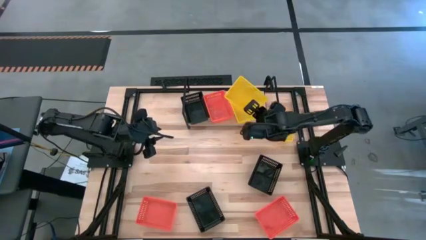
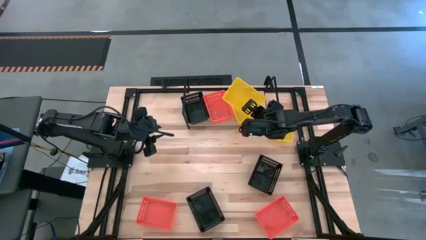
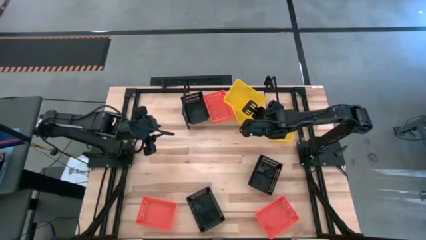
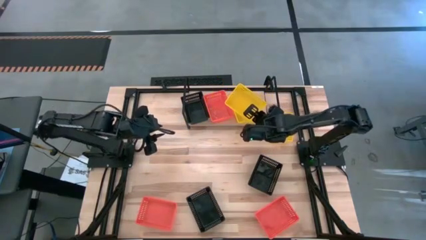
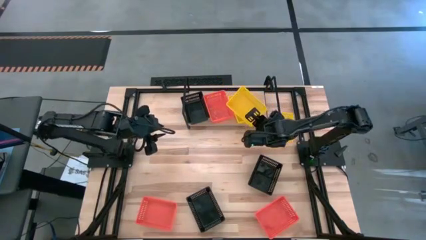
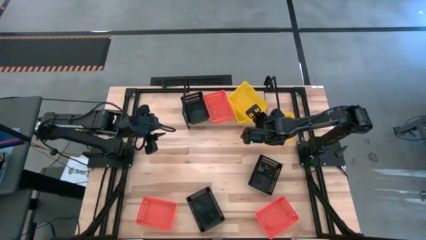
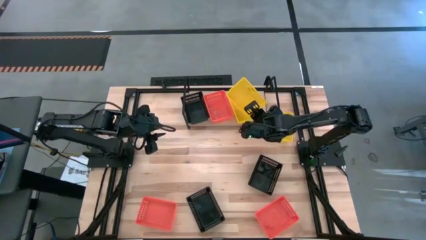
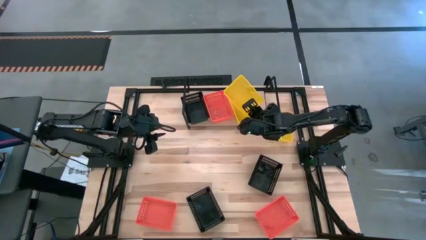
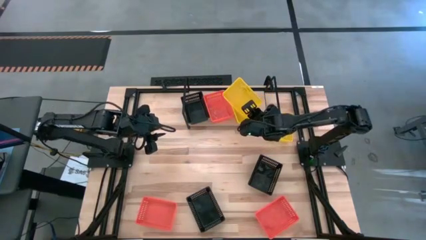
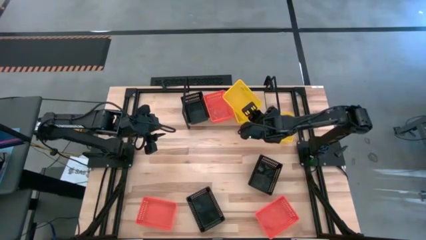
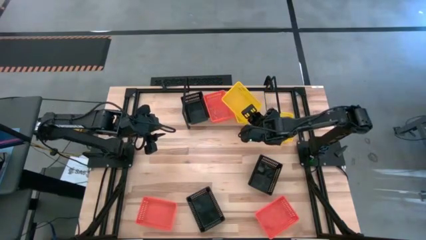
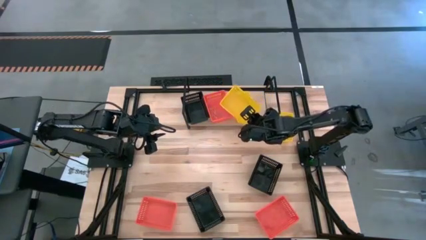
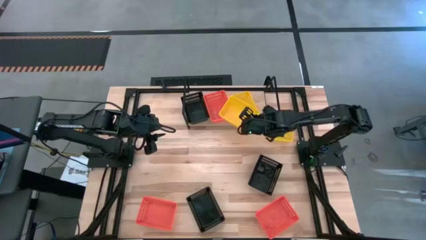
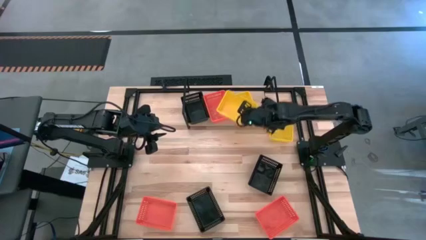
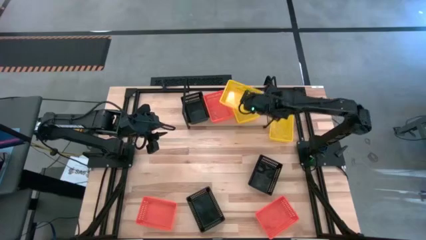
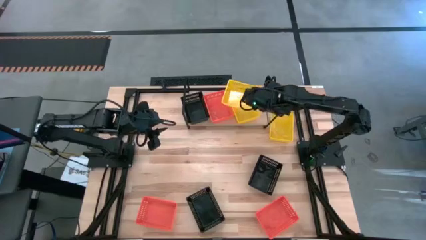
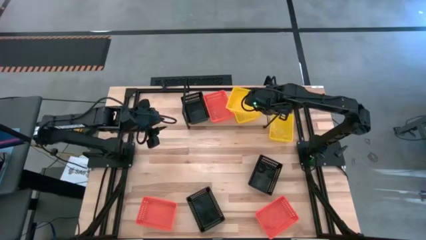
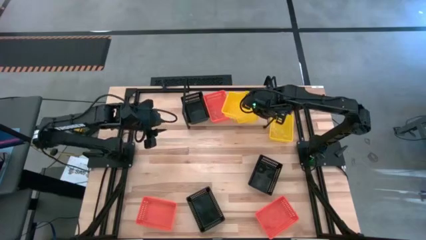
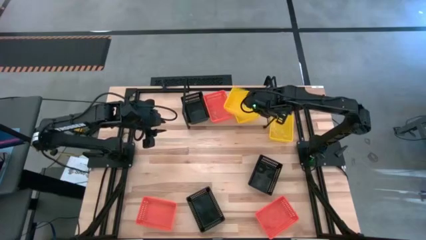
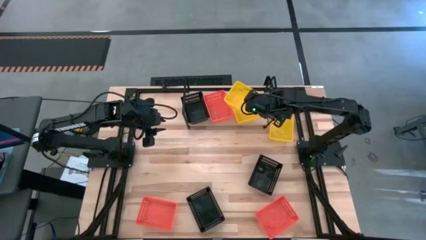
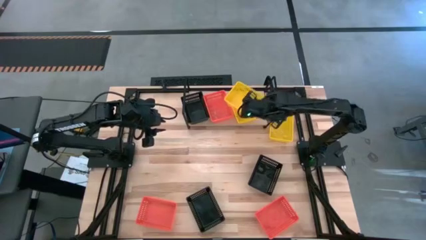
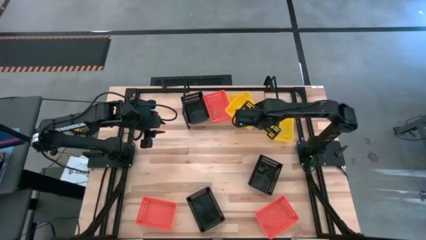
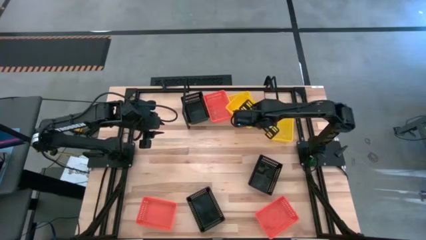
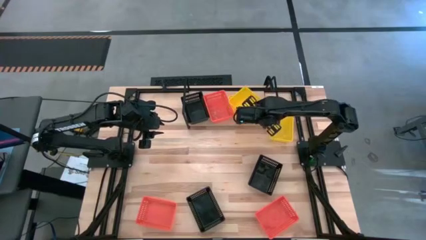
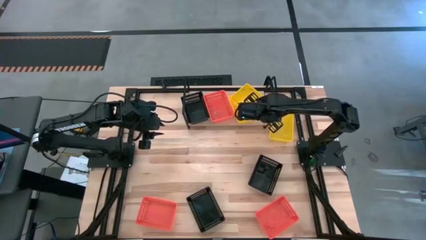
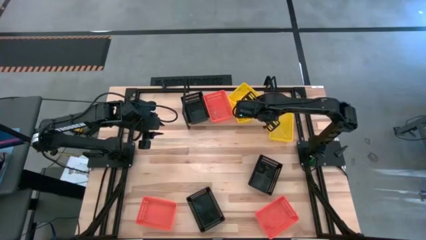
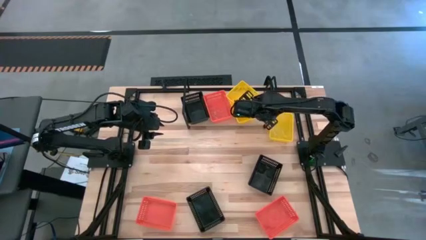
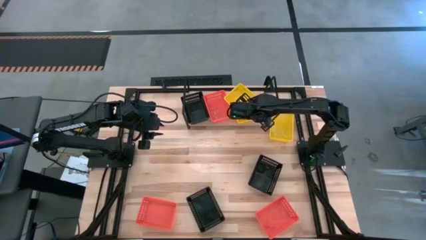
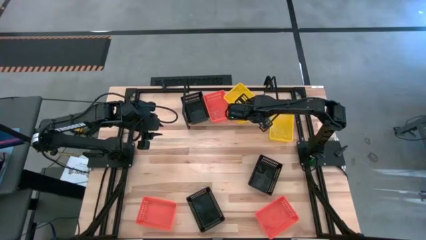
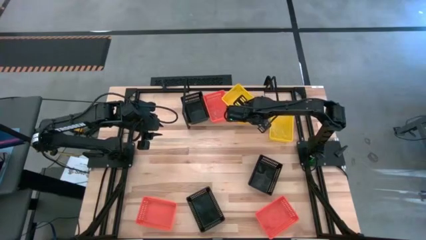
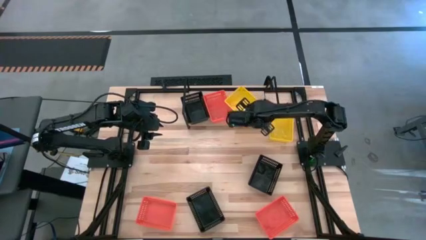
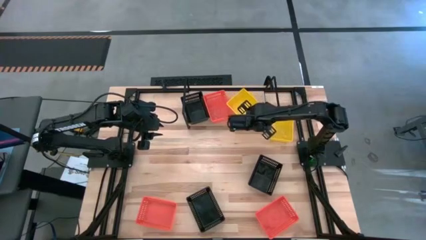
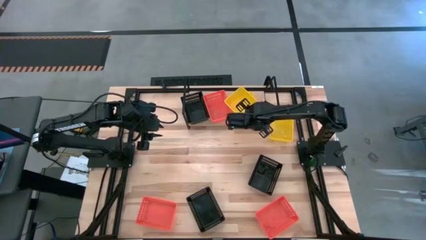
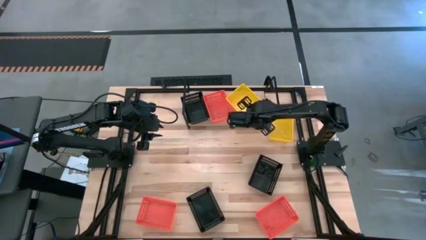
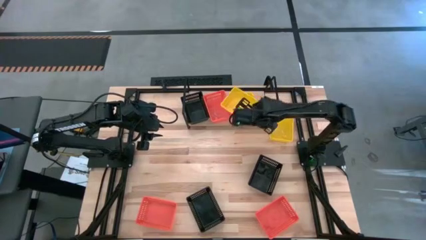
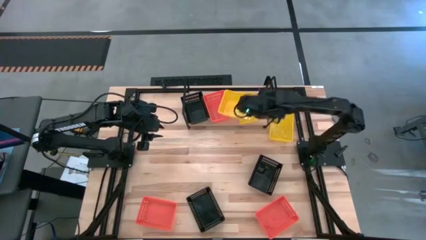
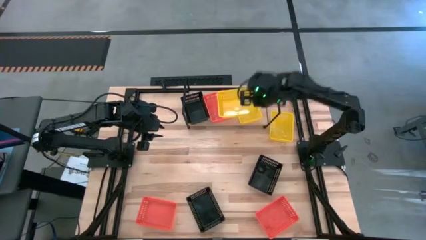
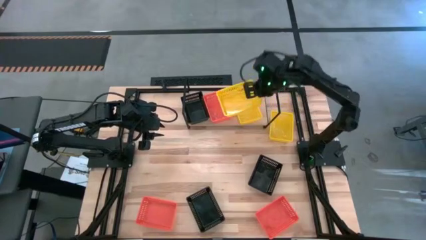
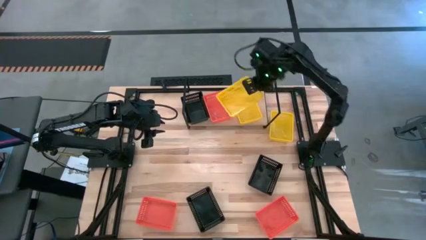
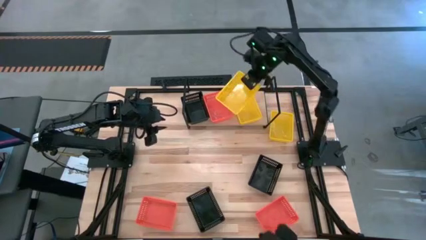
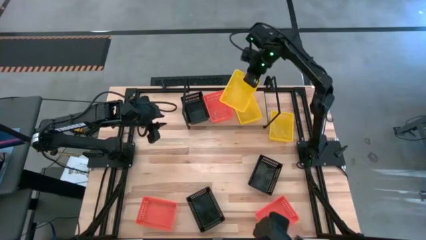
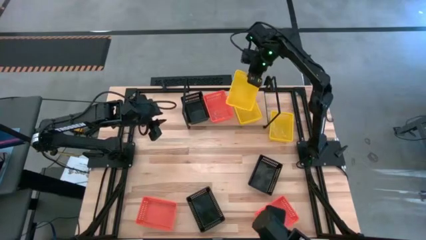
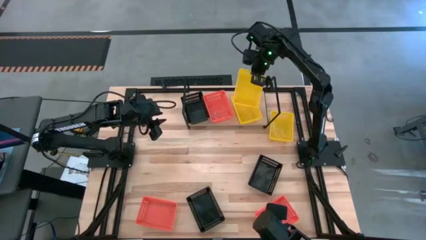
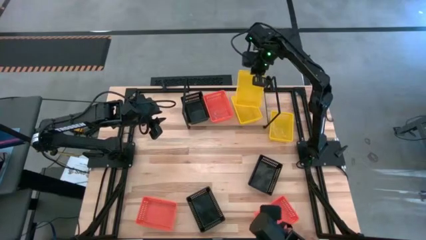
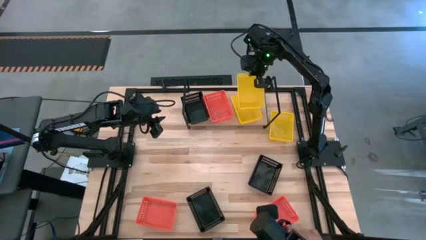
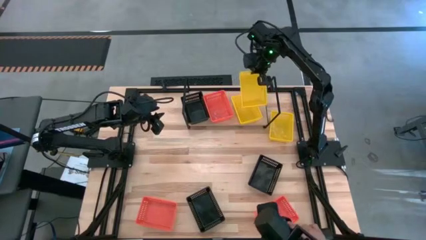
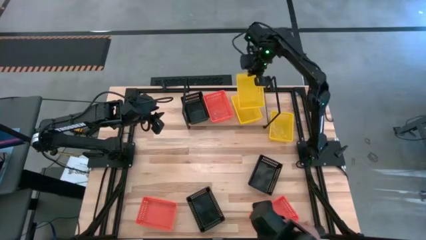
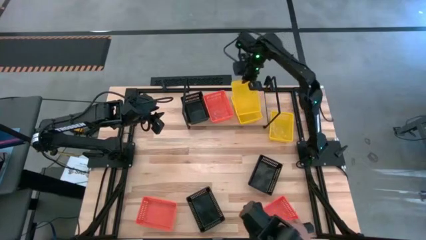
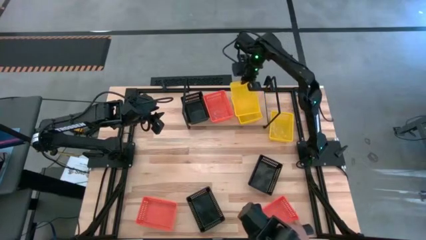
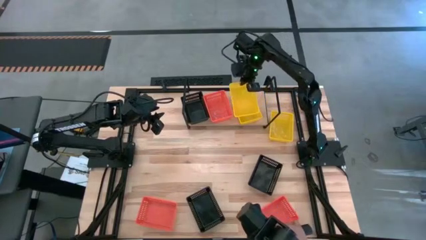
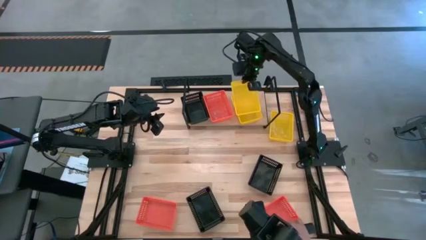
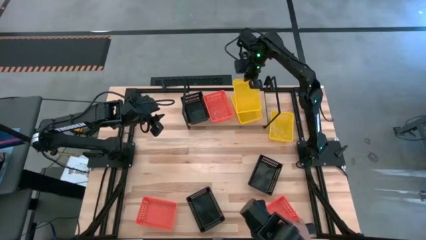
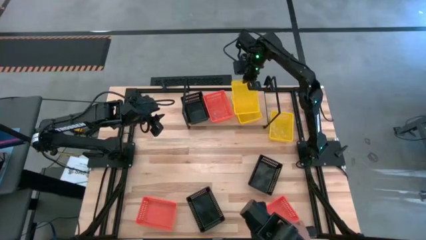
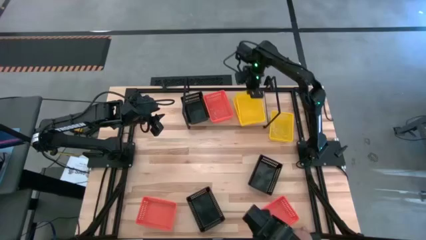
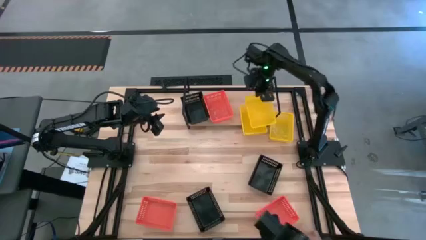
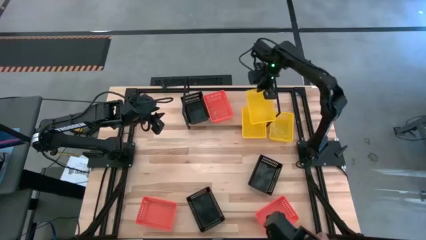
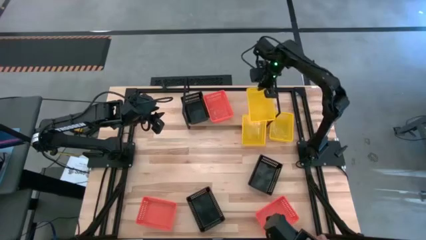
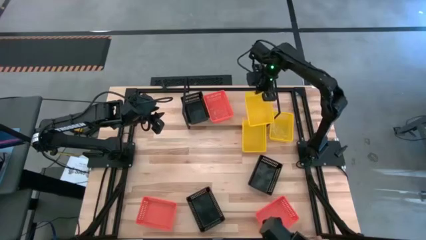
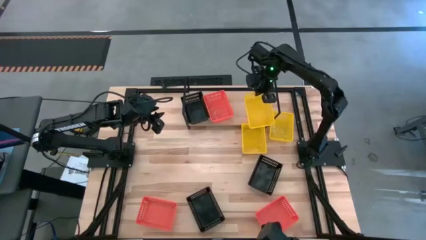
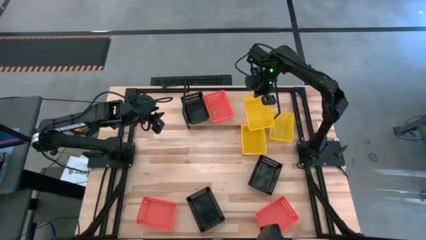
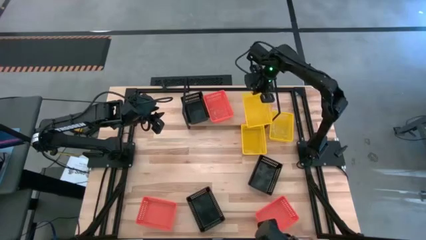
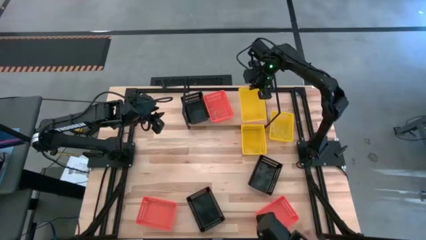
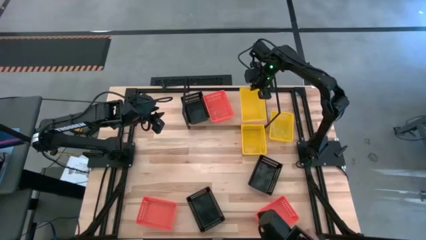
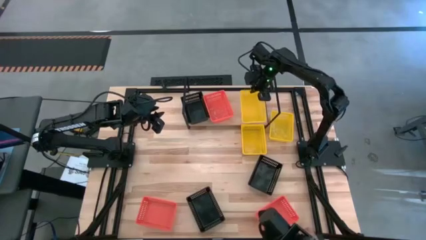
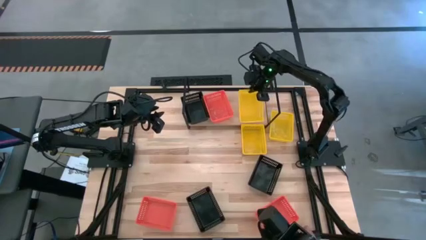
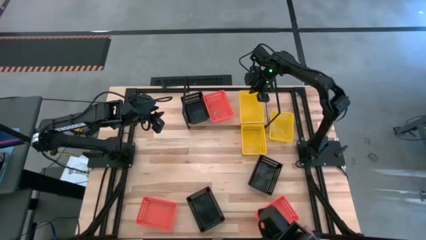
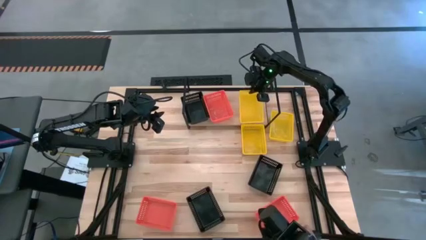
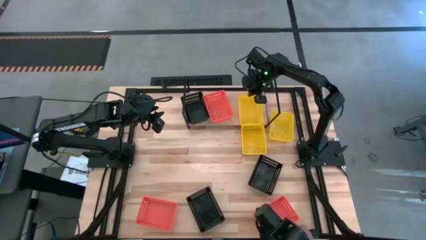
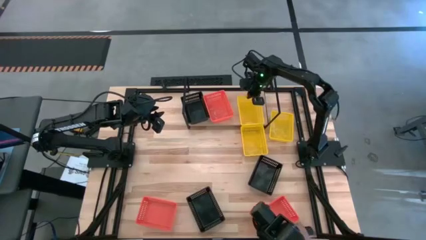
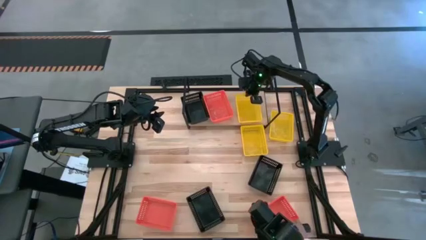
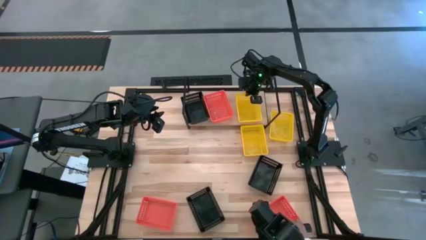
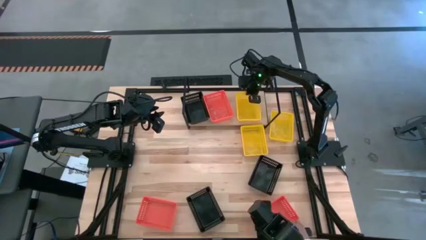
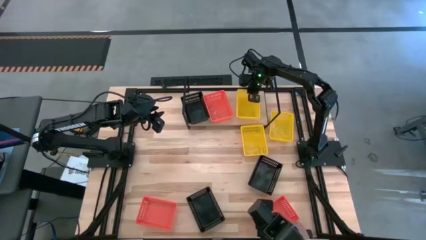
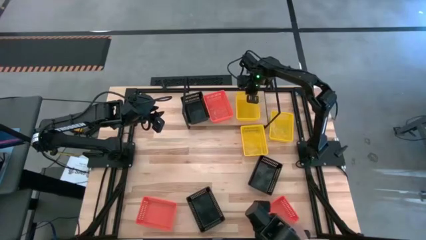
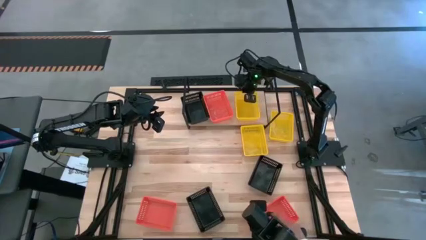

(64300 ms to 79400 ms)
Task: Stack baskets on shelf by color
Stack the bottom yellow bin on top of the other yellow bin on the shelf
